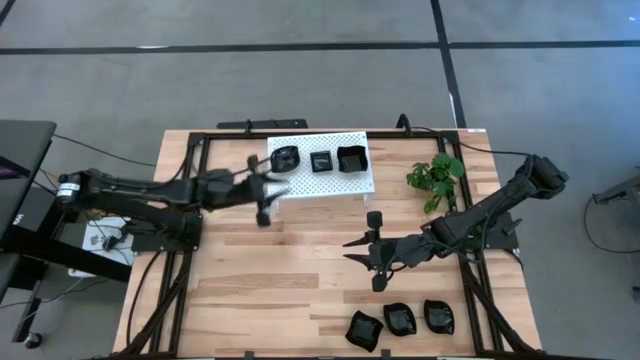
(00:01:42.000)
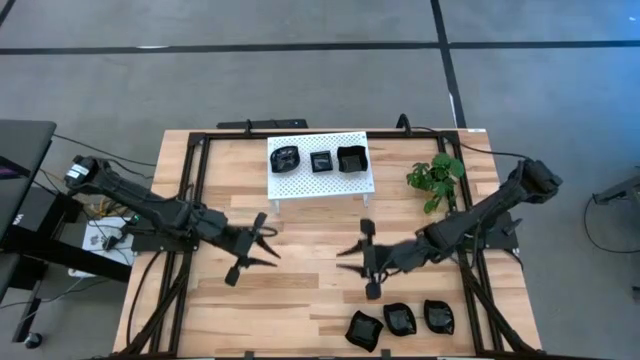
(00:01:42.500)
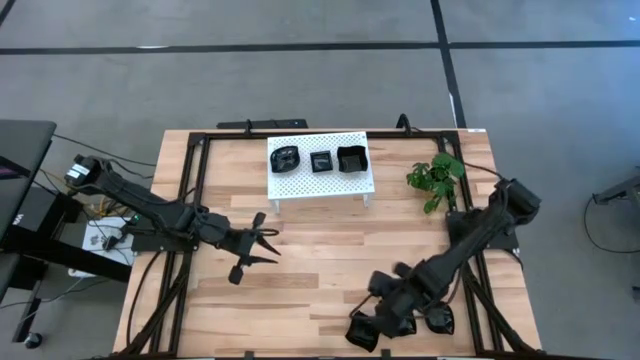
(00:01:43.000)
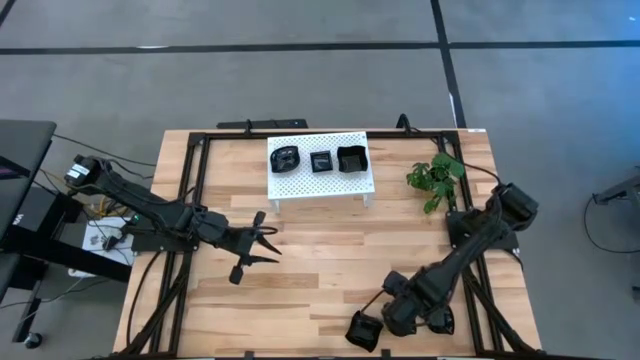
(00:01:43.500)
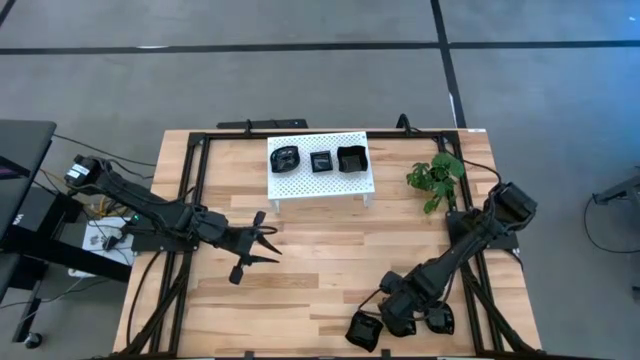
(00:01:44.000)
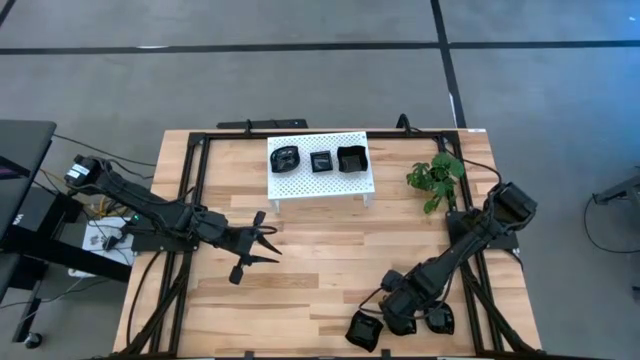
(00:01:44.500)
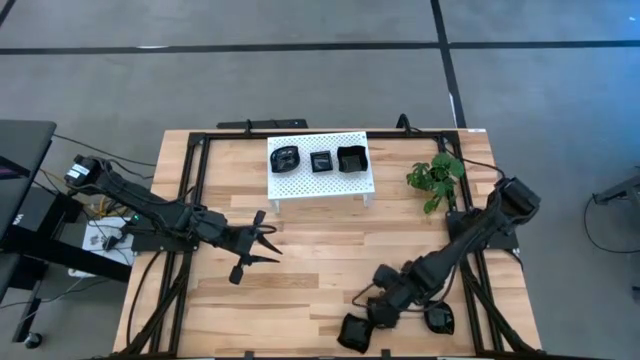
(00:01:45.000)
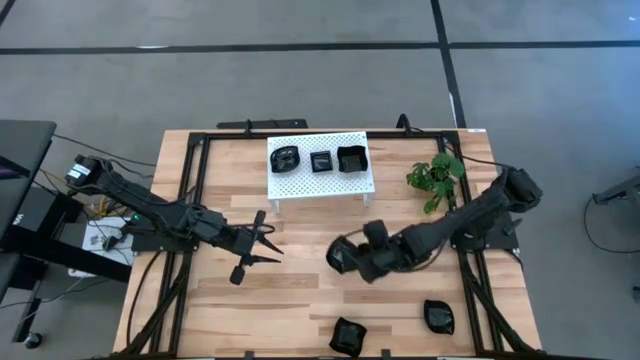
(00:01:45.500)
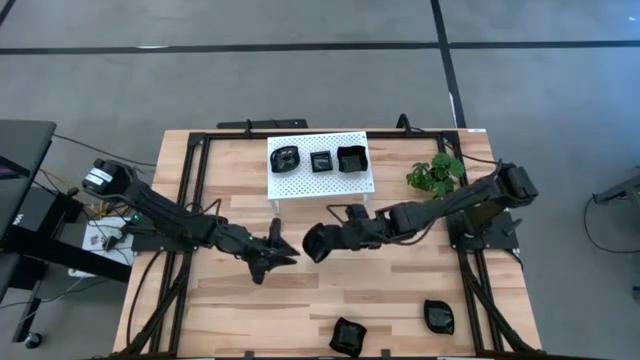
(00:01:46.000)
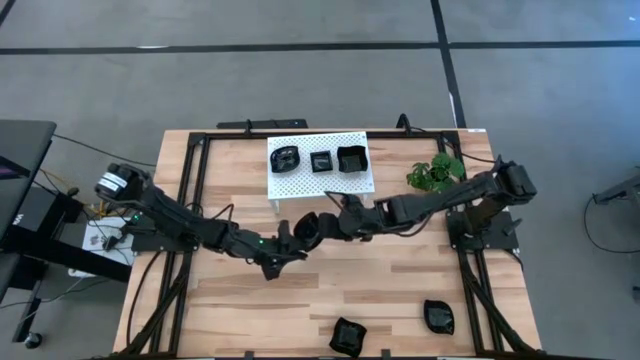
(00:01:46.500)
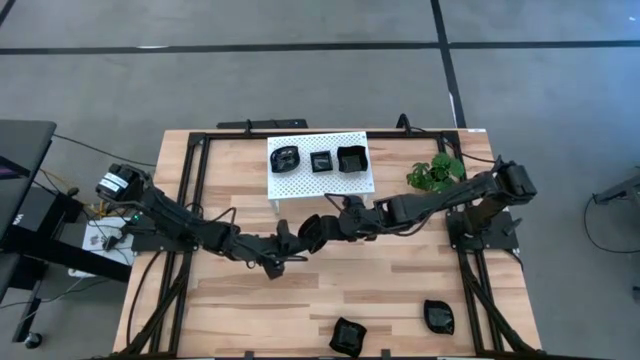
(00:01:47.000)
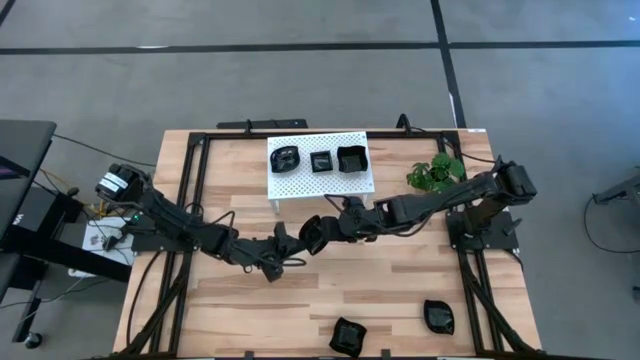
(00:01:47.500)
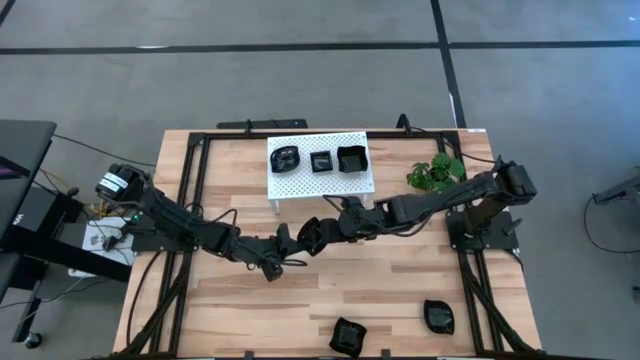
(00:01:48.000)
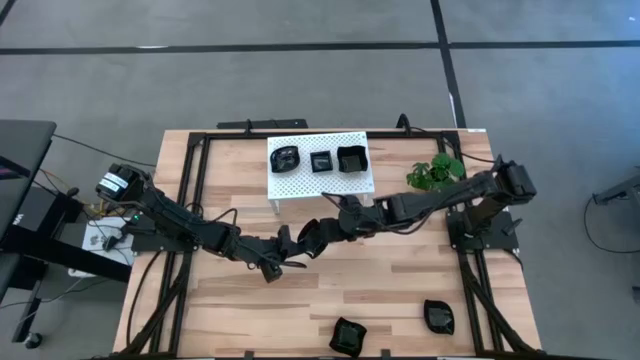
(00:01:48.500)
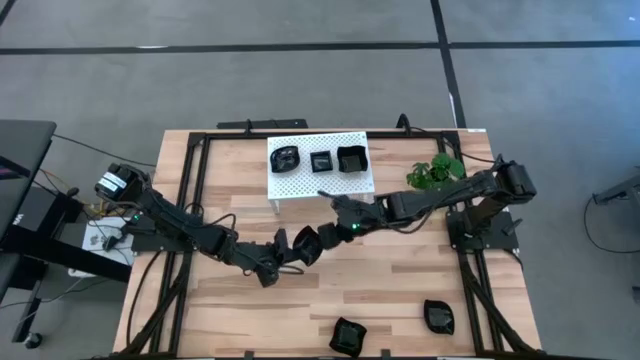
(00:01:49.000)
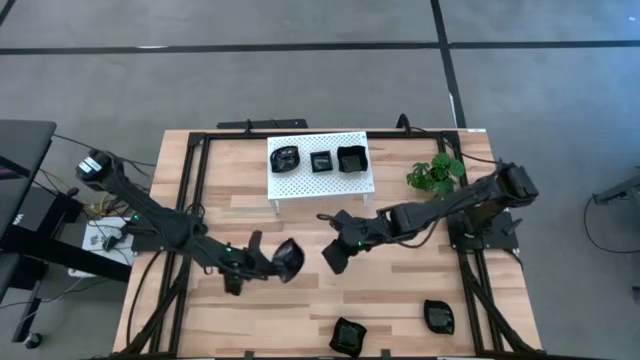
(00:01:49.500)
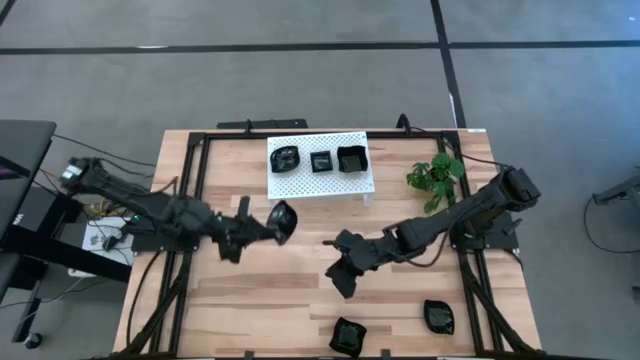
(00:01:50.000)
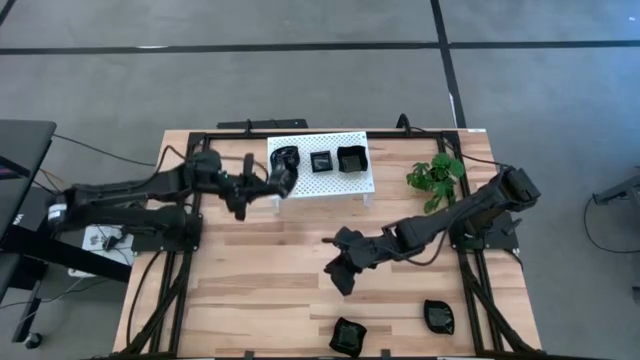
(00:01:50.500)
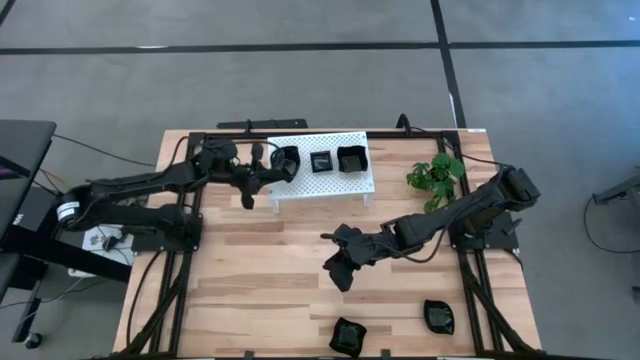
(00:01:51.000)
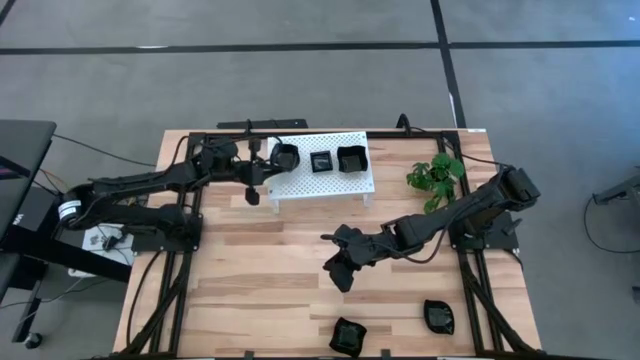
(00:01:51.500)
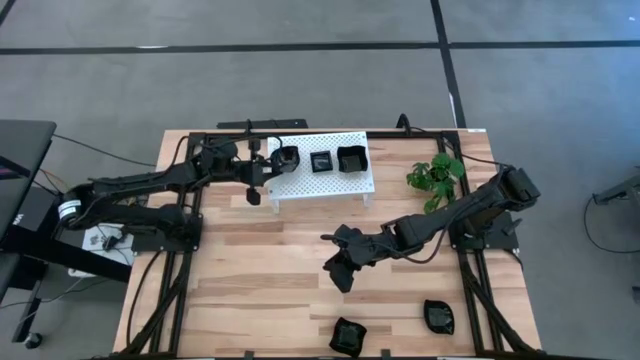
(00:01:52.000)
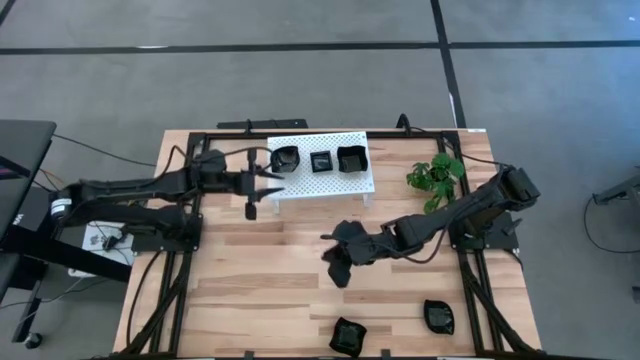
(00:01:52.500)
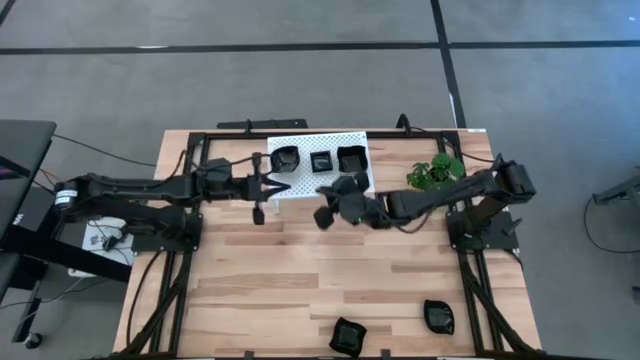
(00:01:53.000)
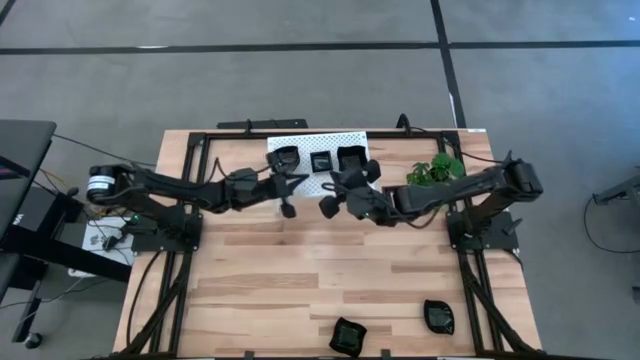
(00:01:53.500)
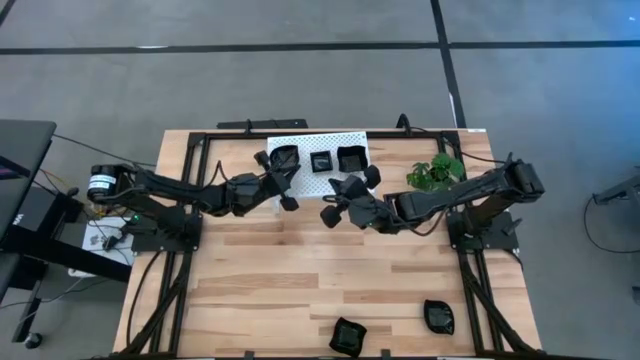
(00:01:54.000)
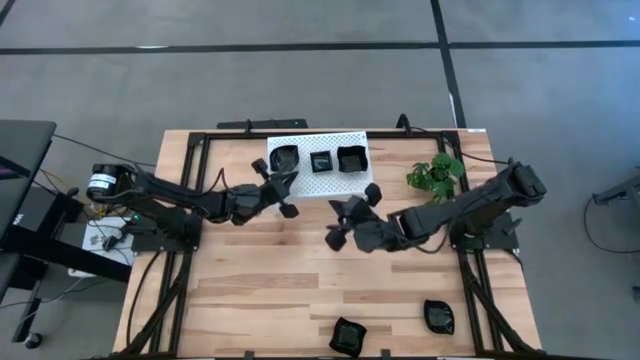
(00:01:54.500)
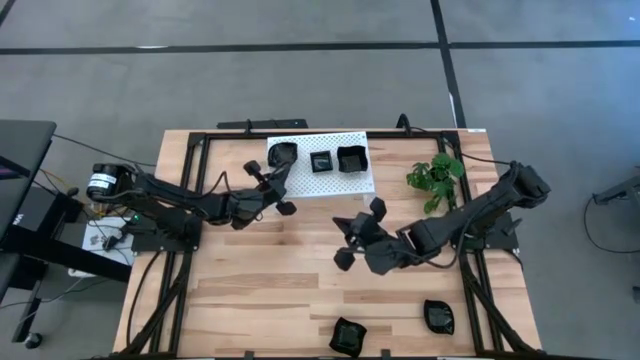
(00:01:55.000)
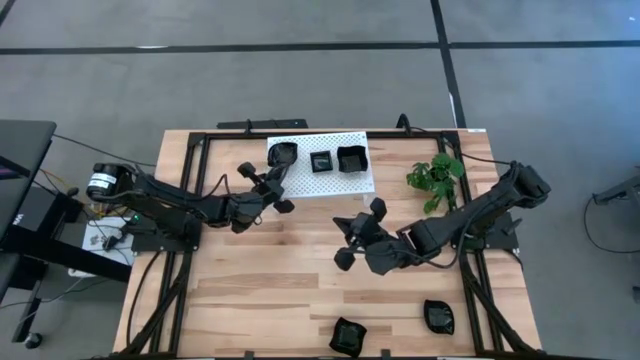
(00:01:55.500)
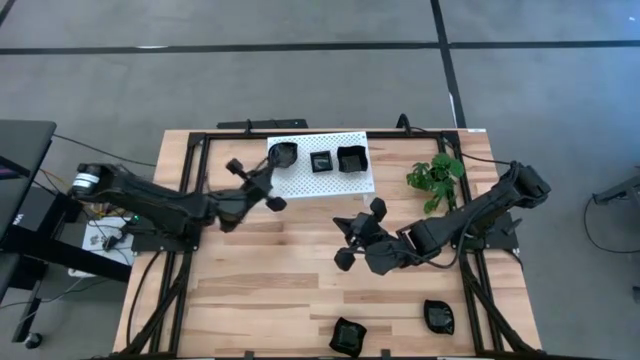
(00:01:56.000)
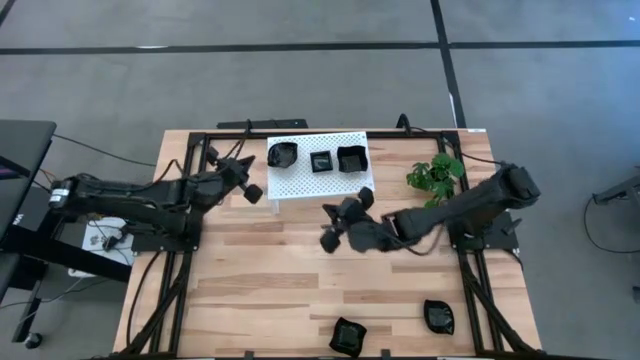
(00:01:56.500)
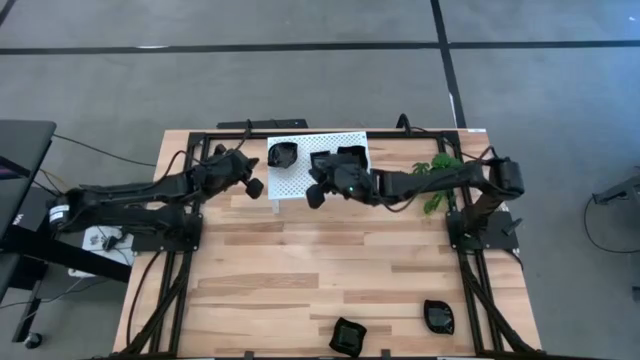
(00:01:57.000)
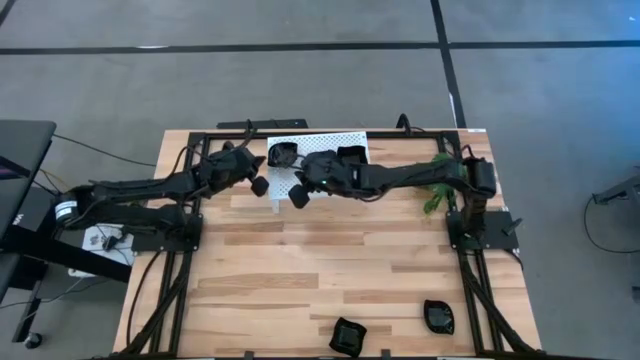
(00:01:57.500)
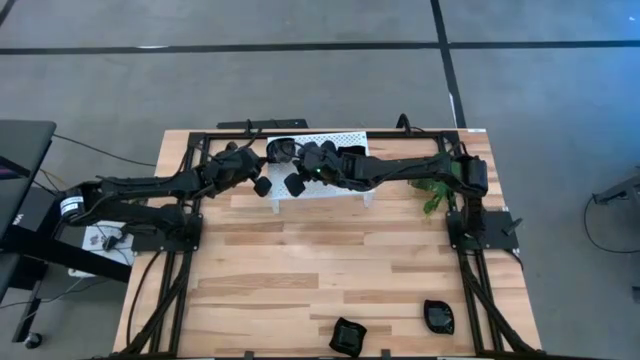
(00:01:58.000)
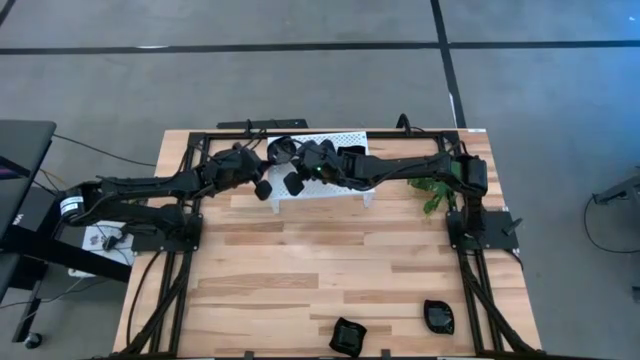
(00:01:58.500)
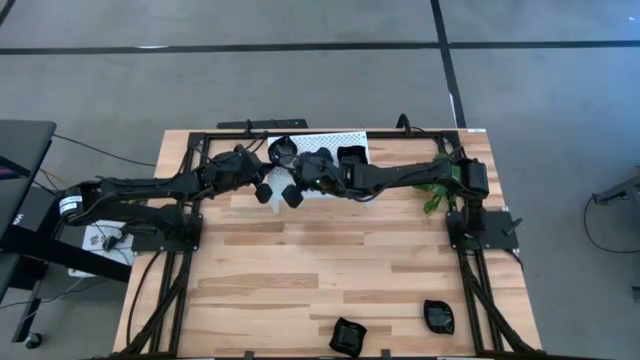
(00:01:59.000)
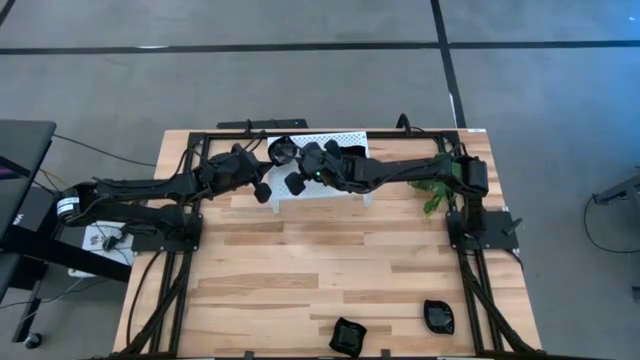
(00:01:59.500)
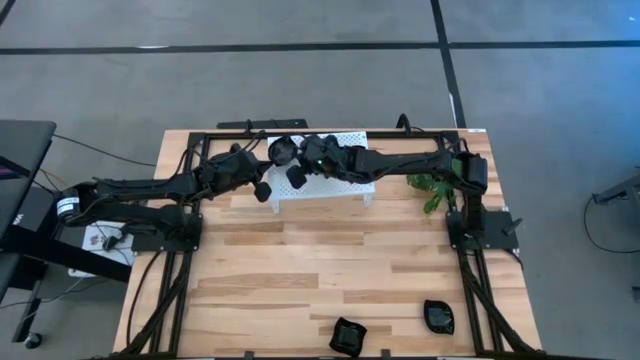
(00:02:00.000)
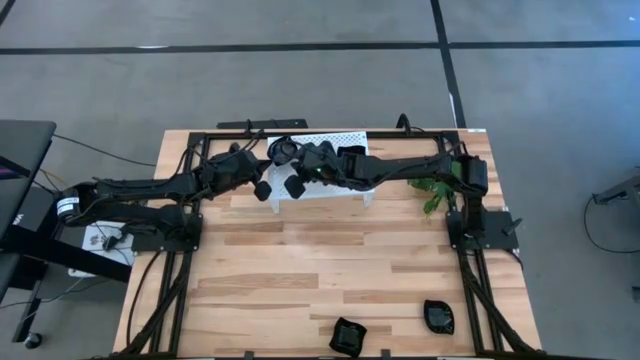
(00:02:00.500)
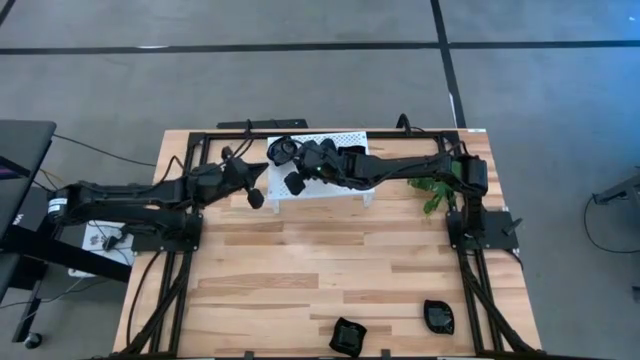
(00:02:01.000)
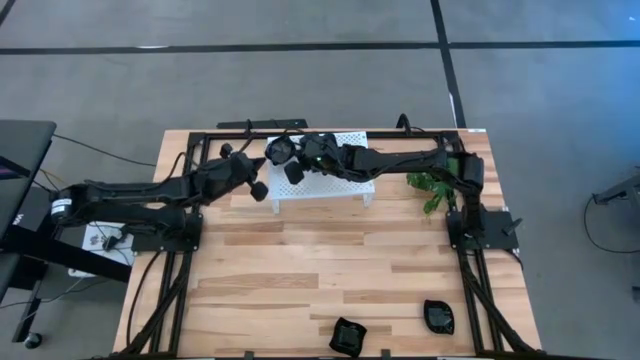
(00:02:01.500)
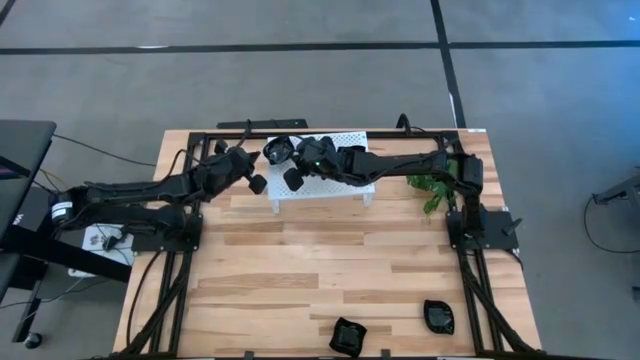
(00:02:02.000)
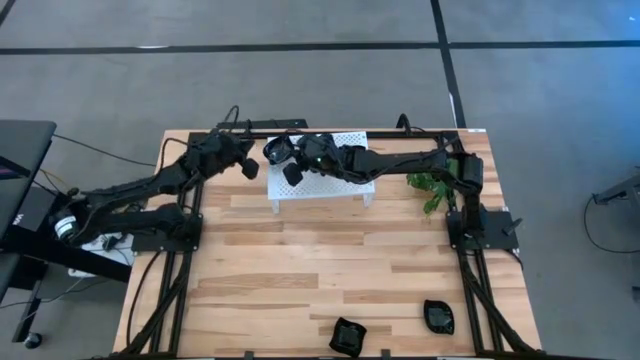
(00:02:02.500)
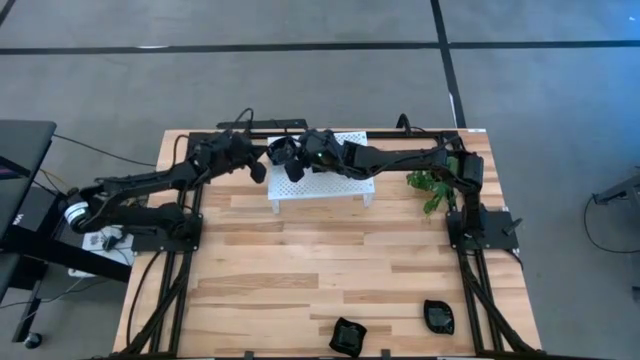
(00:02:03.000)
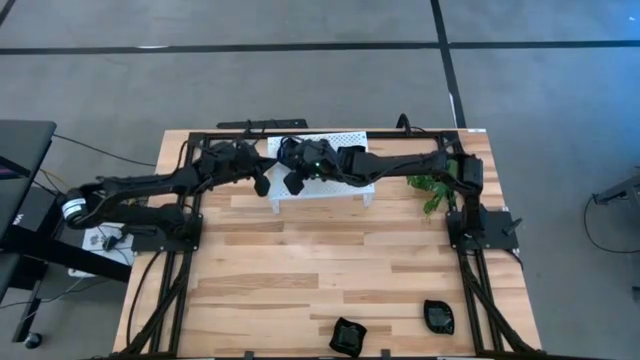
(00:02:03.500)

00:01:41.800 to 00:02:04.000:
Task: Pick & Place Mini shaped plates
Stack the leaf-shaped plate on top of the leaf-shaped plate on the shelf
